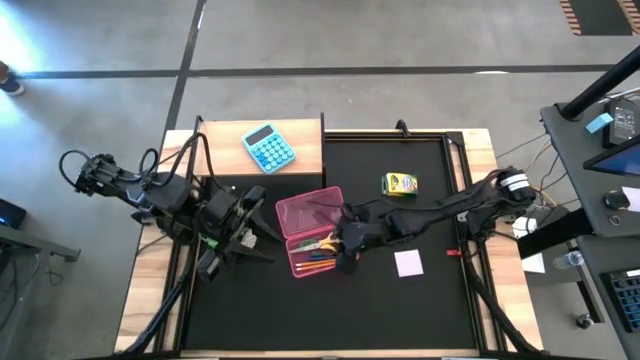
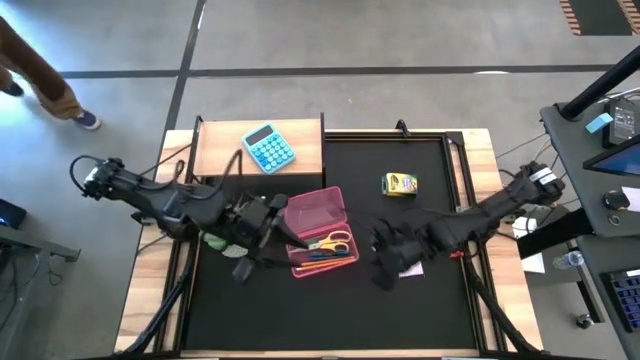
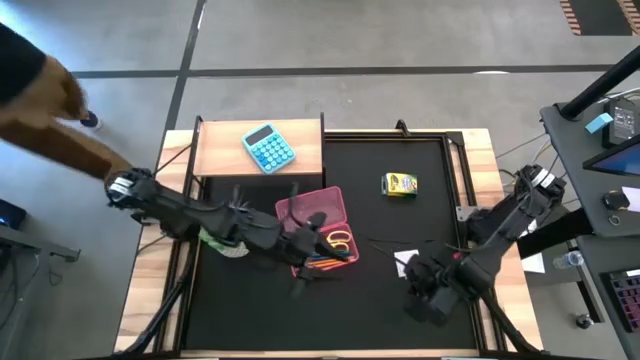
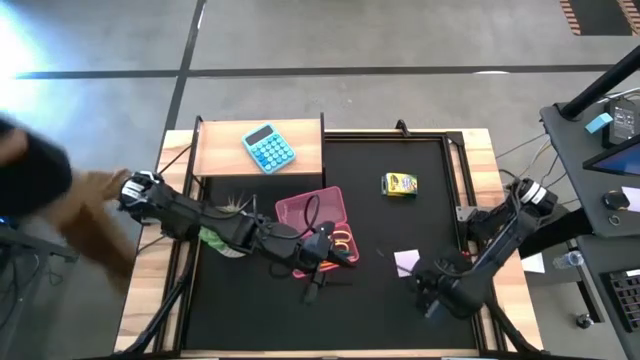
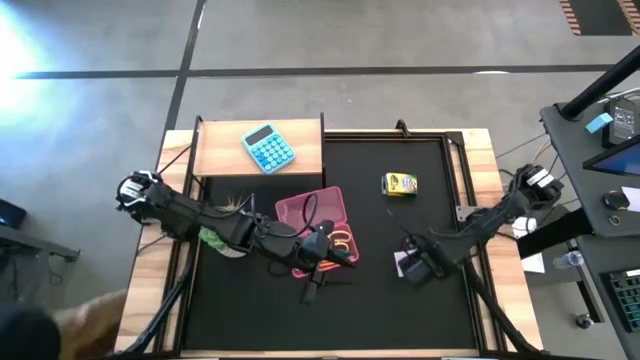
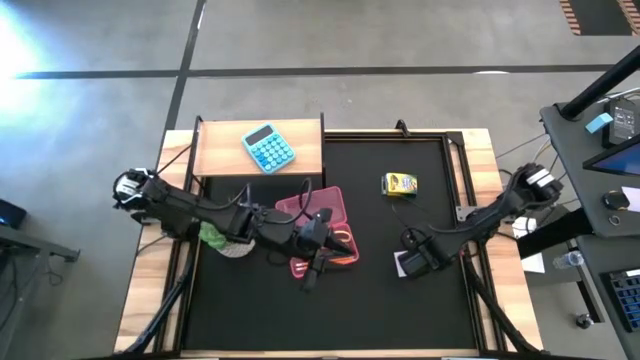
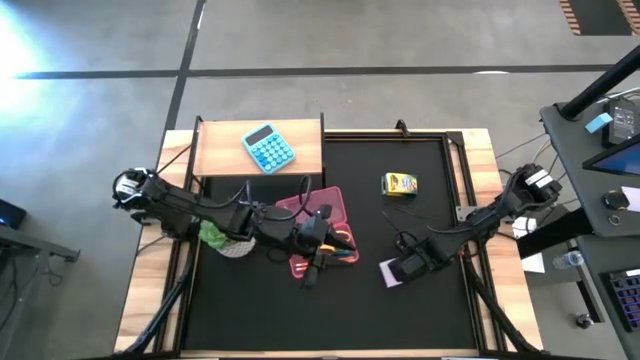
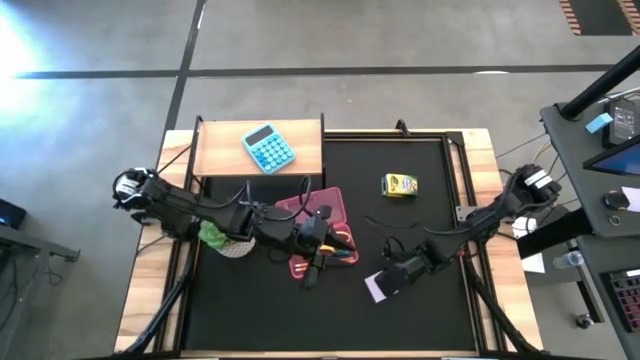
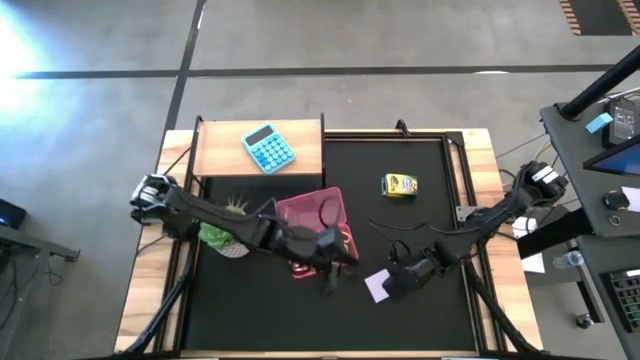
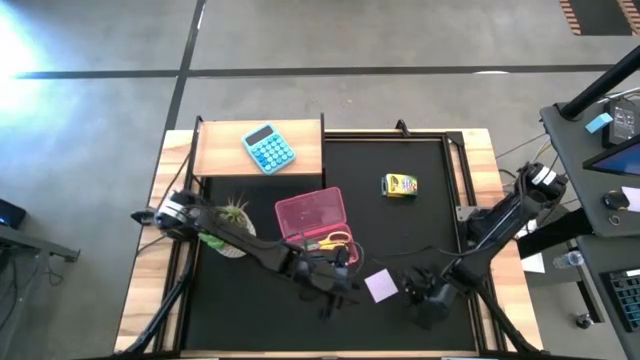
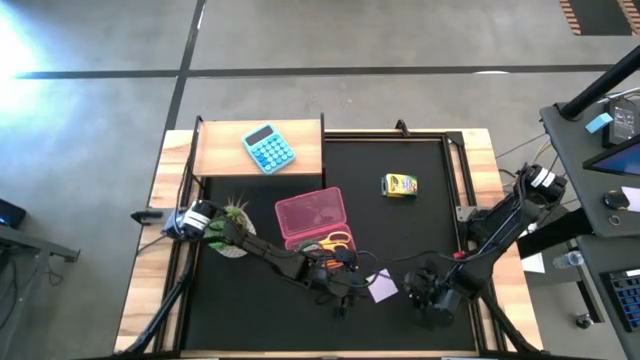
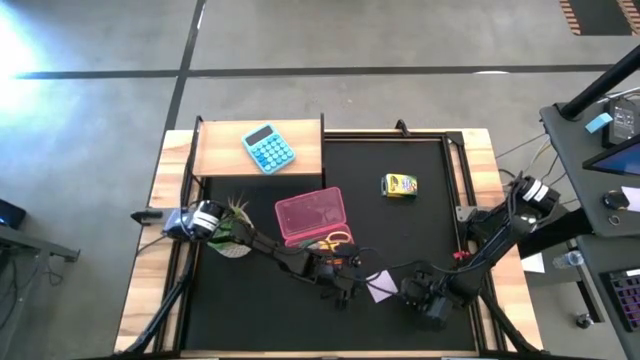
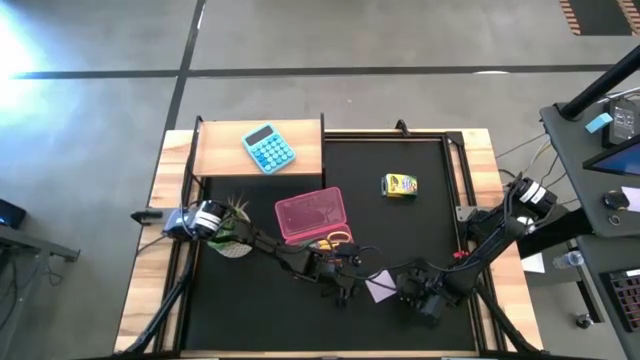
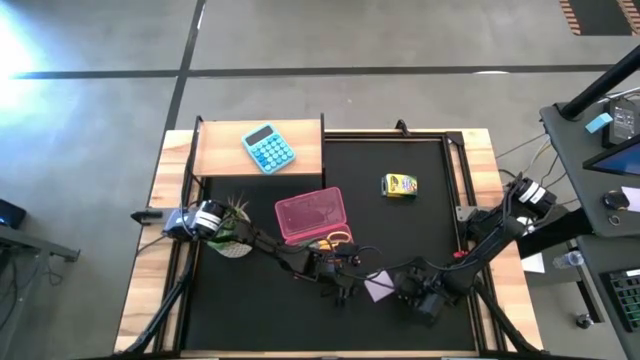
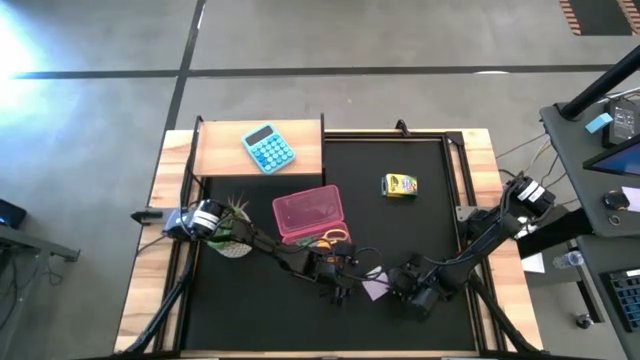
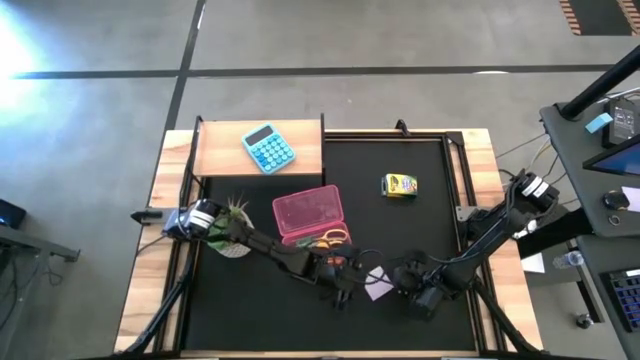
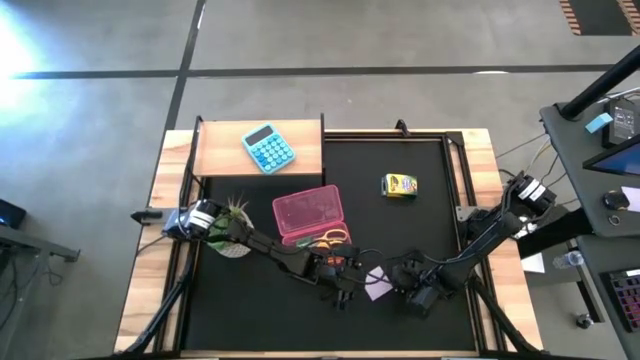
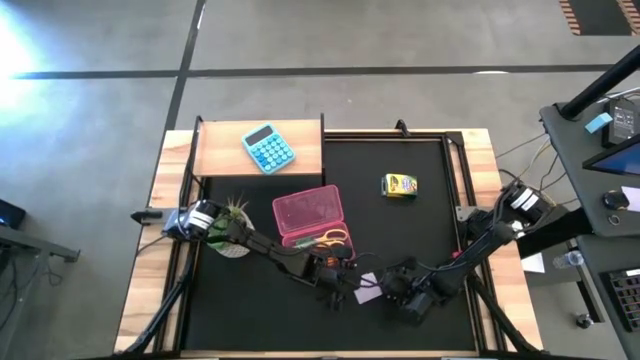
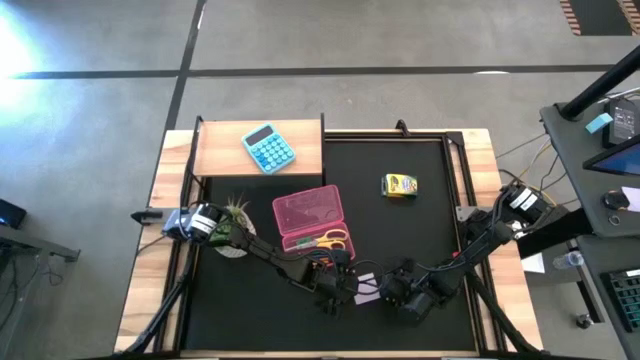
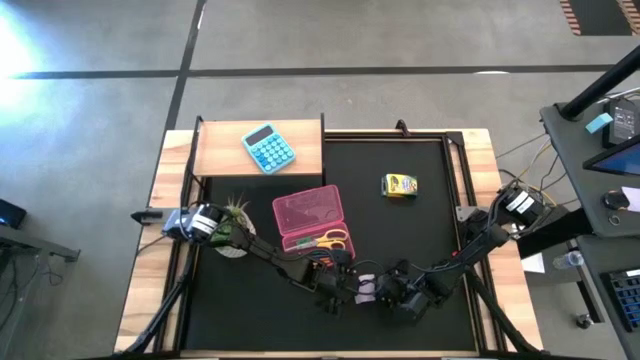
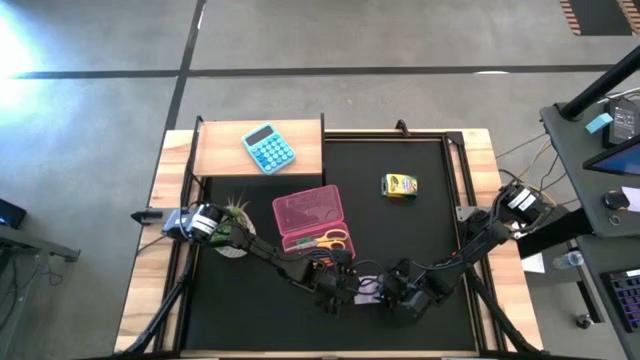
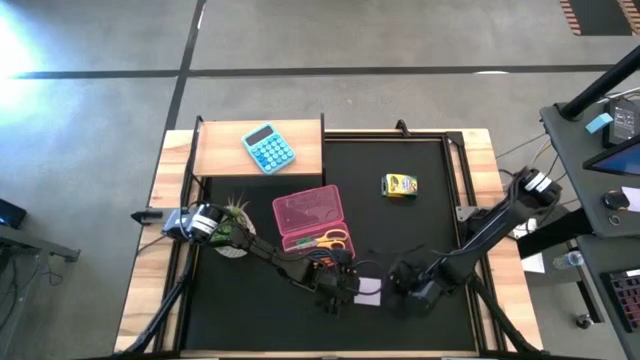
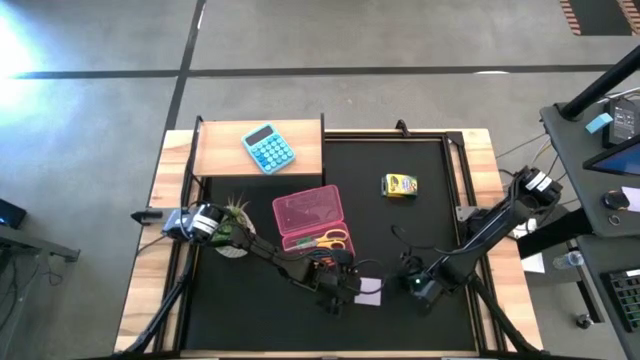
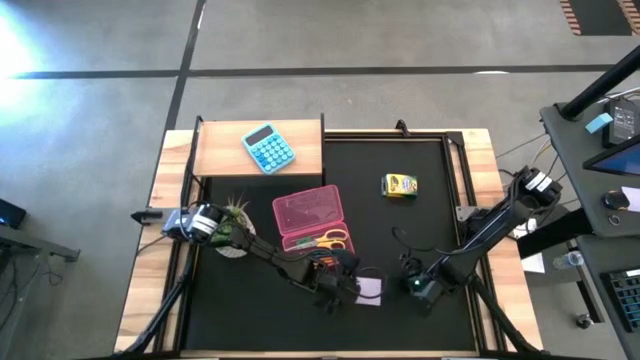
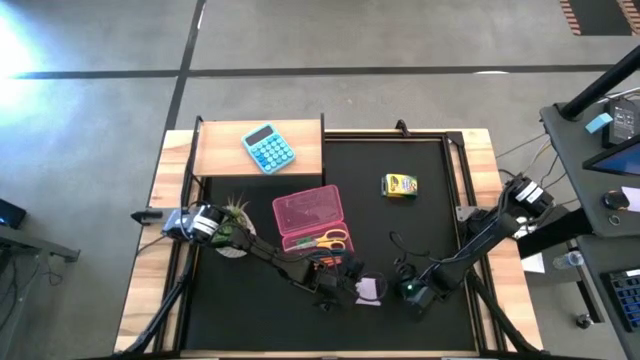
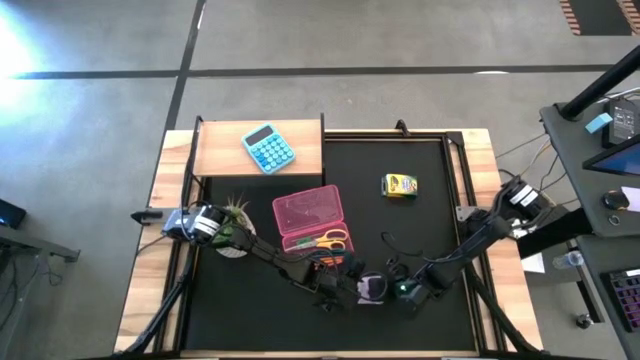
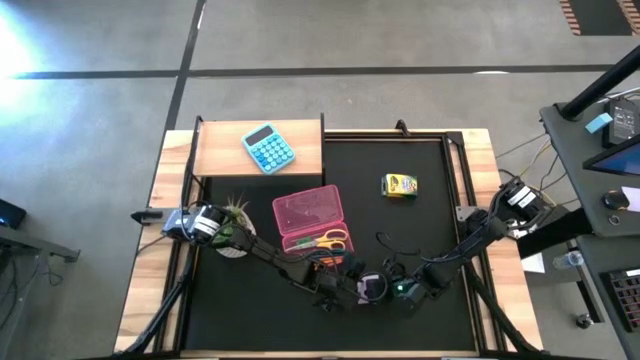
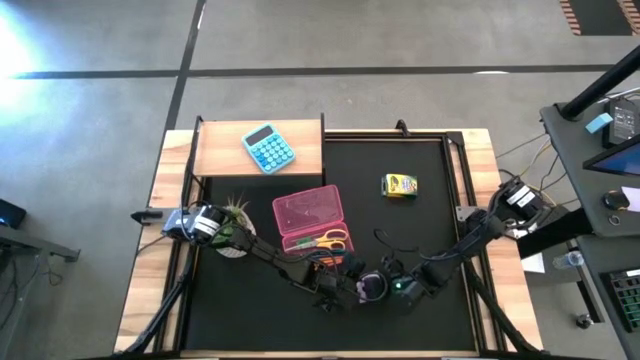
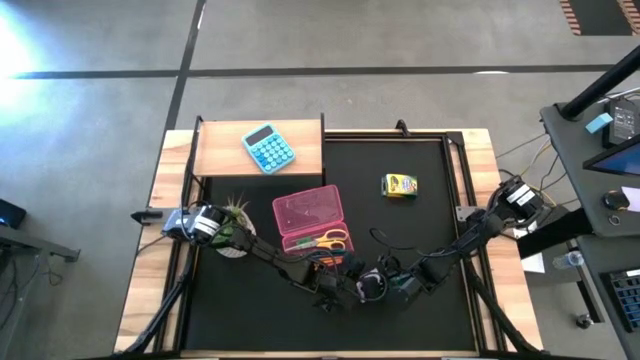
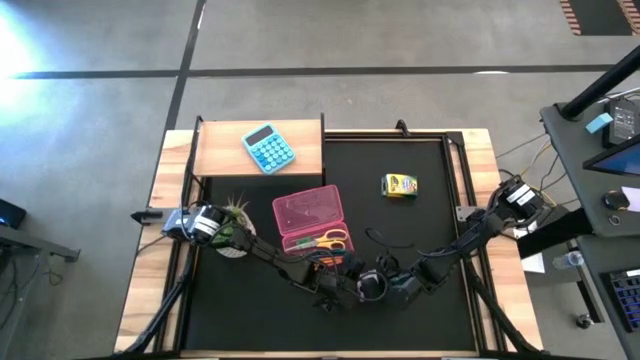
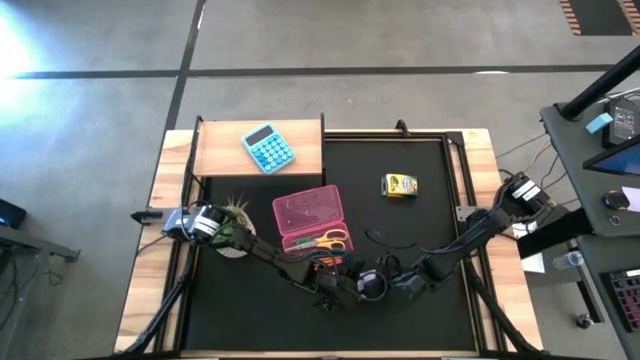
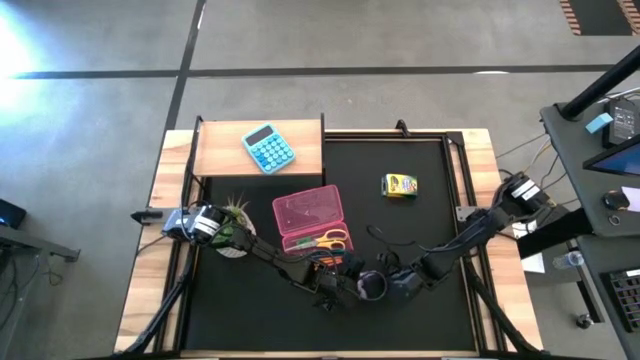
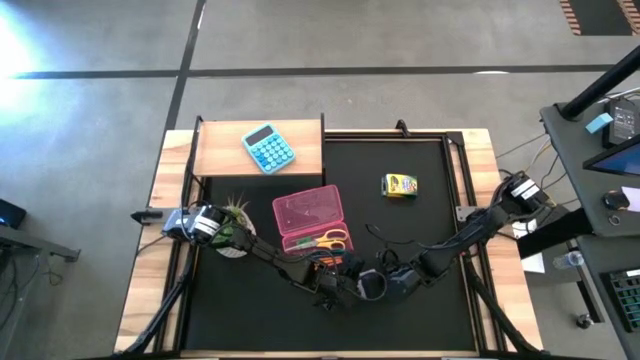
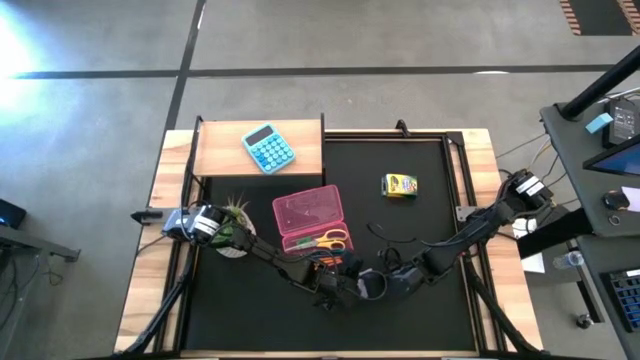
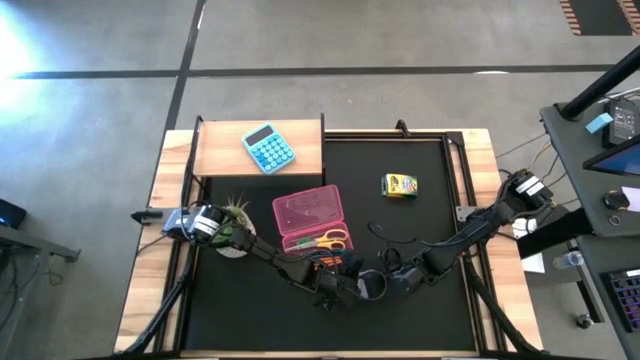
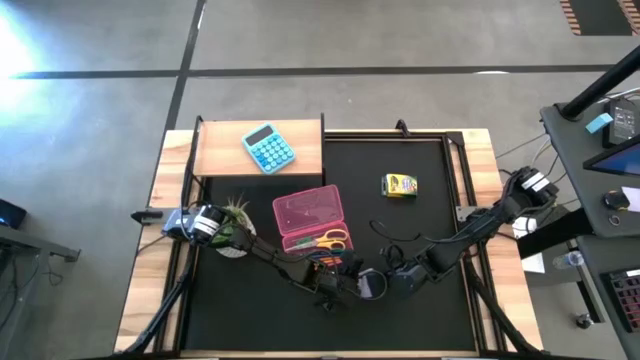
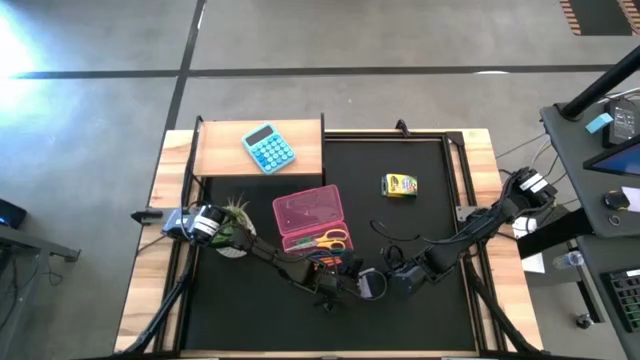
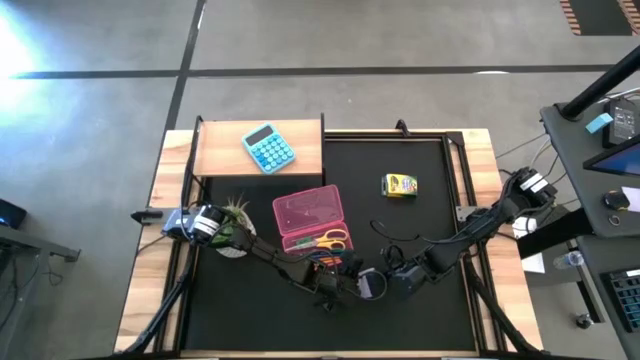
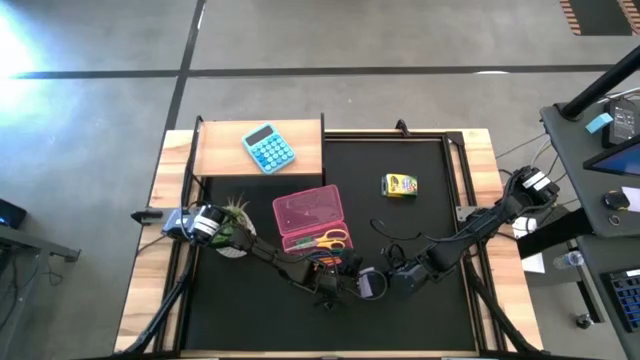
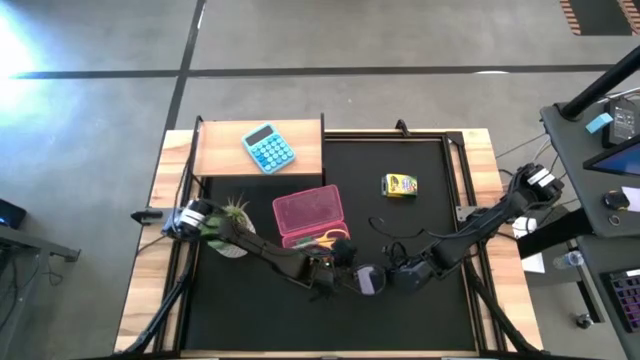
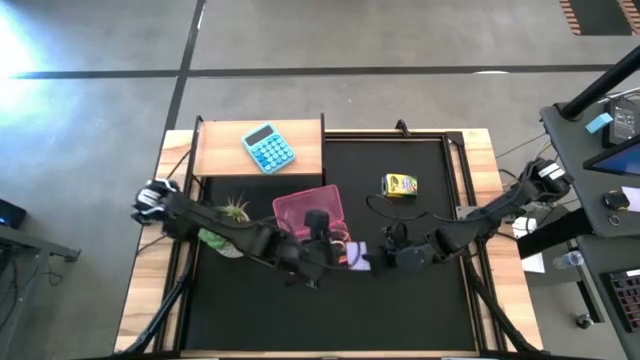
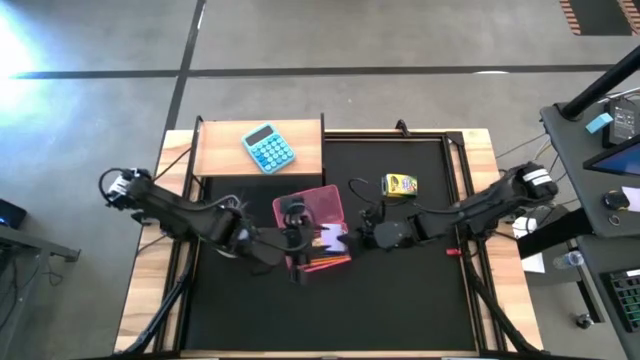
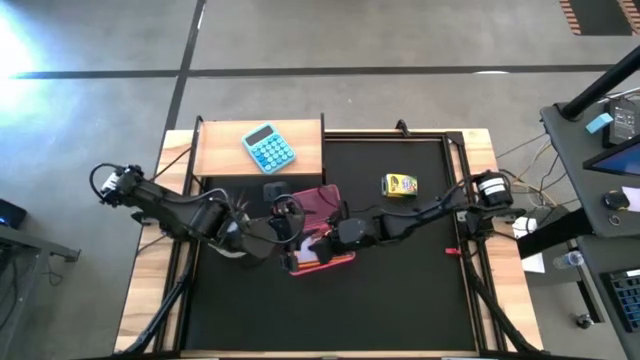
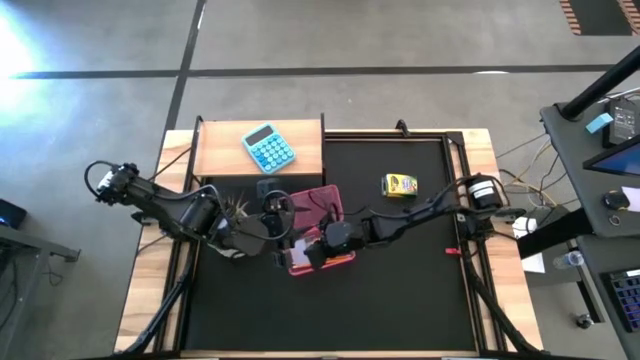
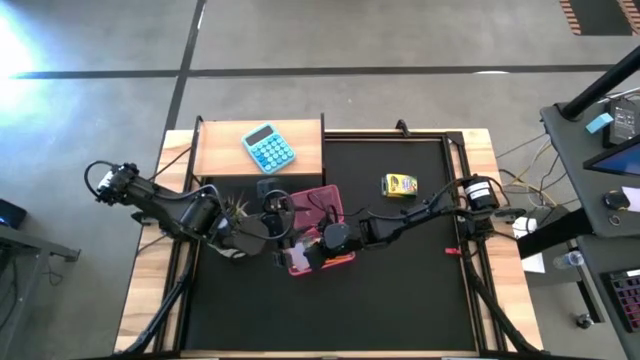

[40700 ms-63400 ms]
Task: Pack school essentials
Put the white notes into the pink box
